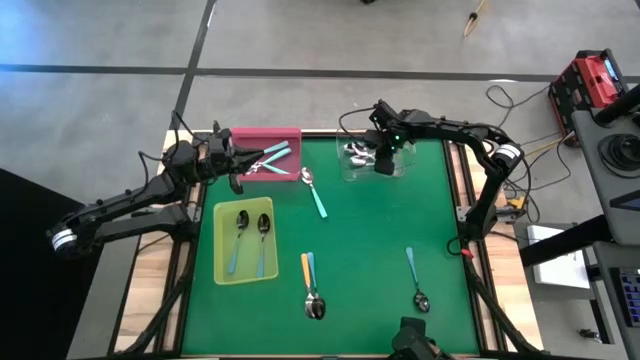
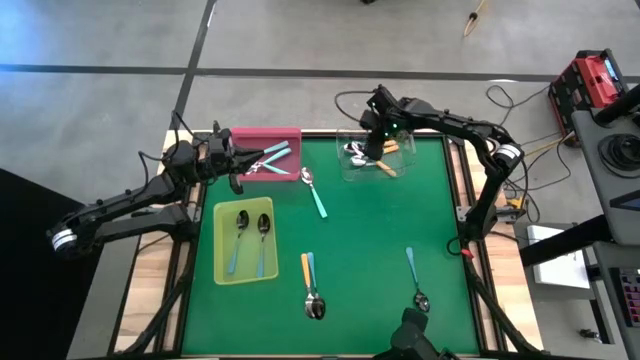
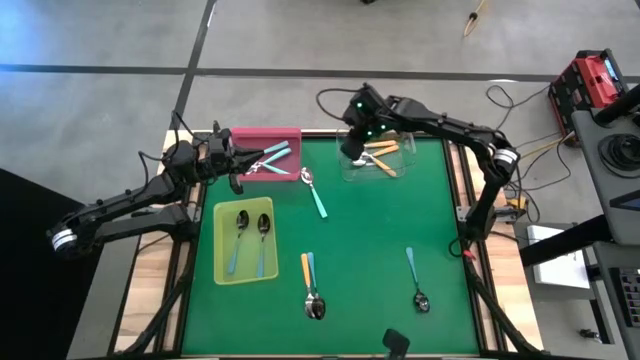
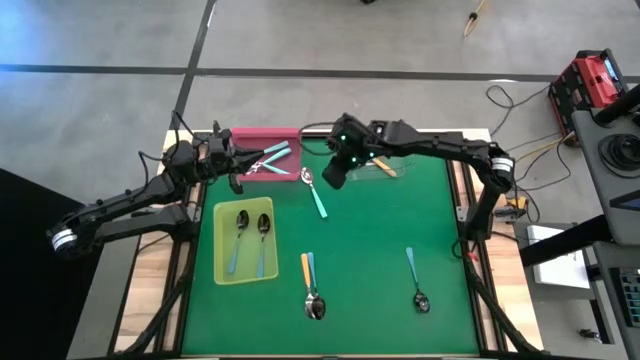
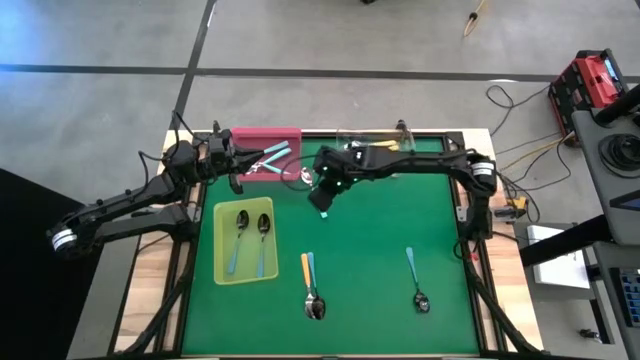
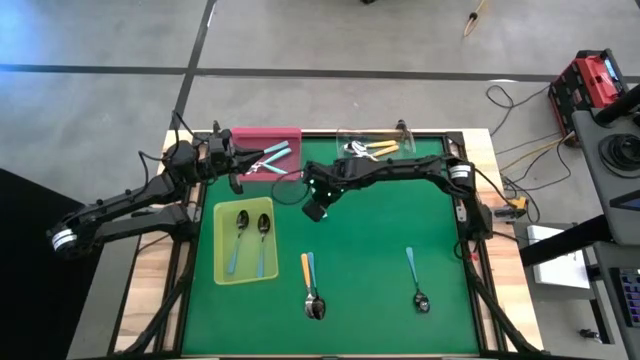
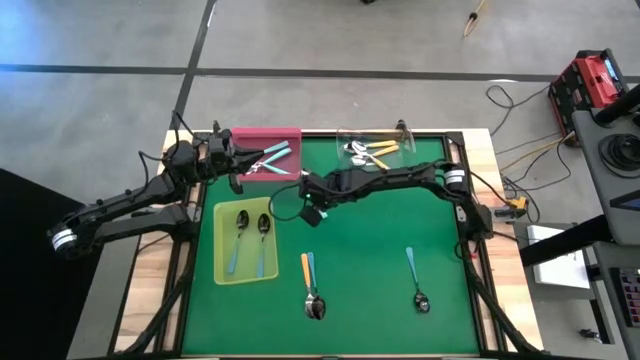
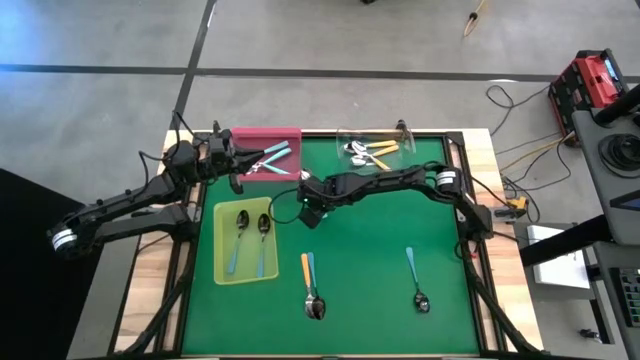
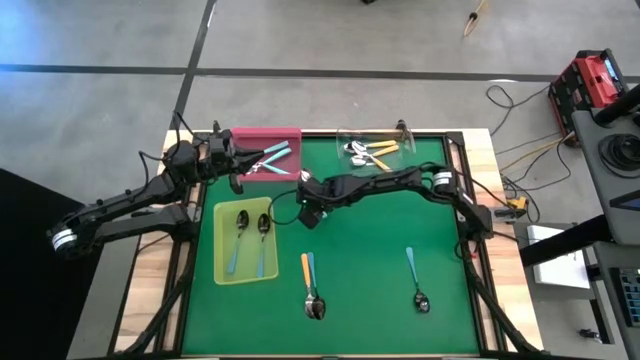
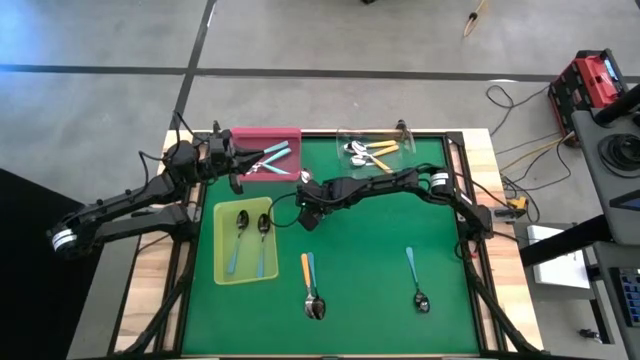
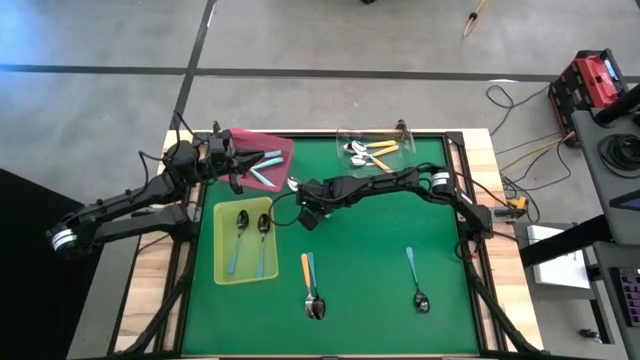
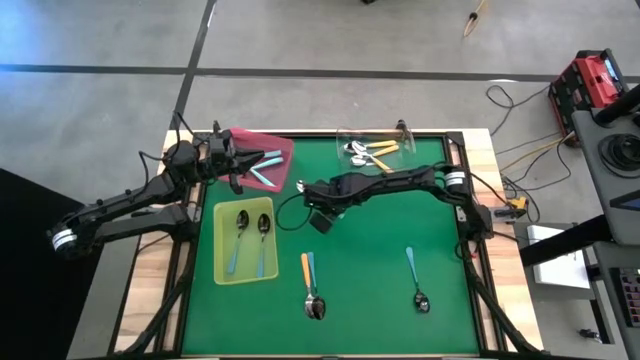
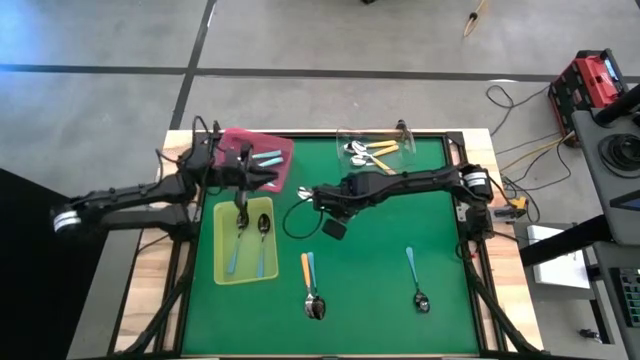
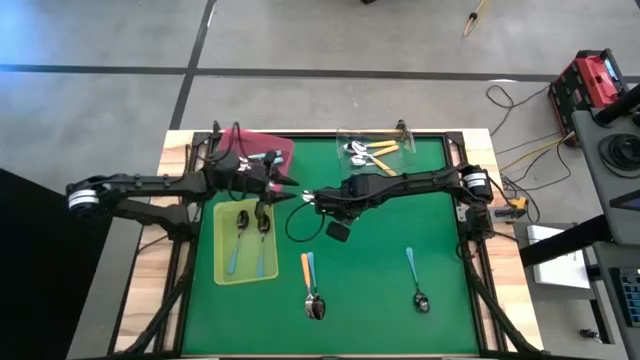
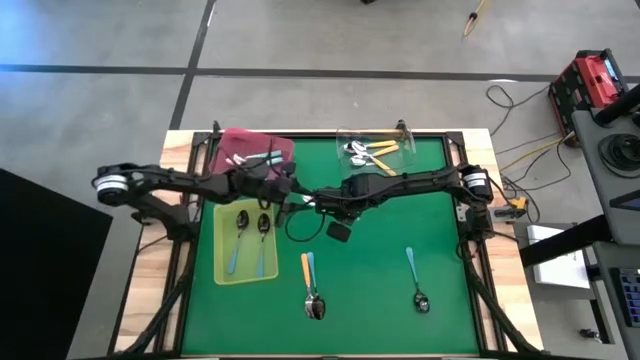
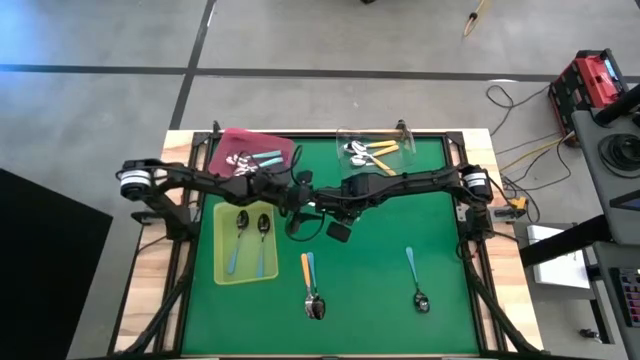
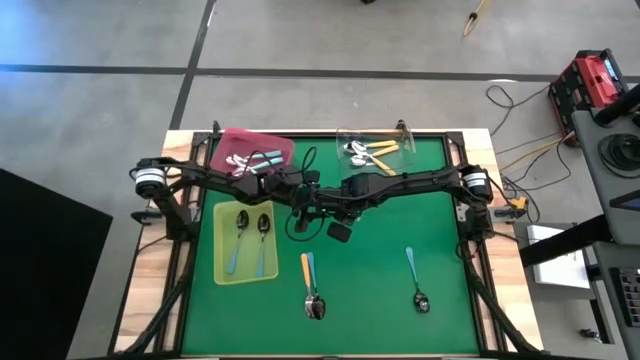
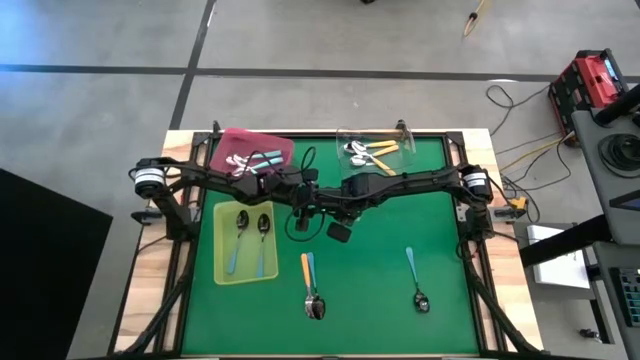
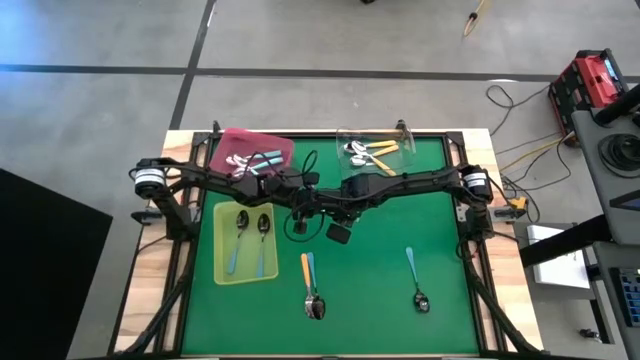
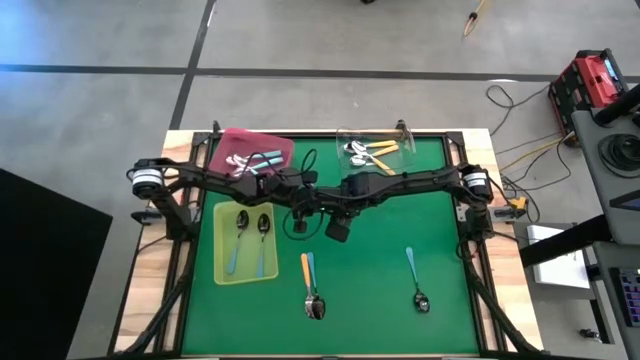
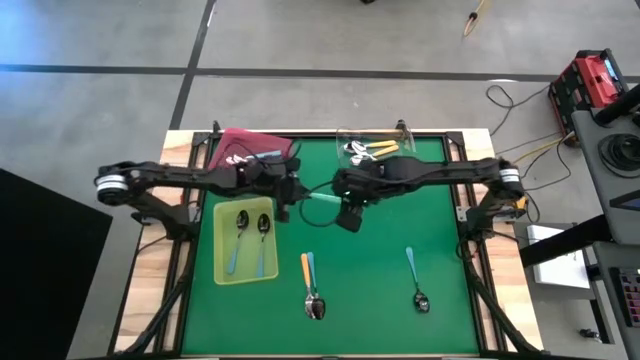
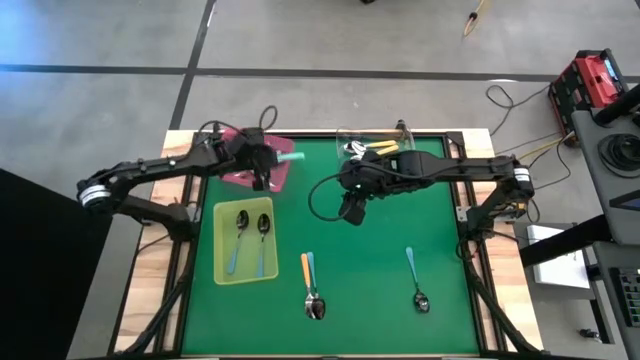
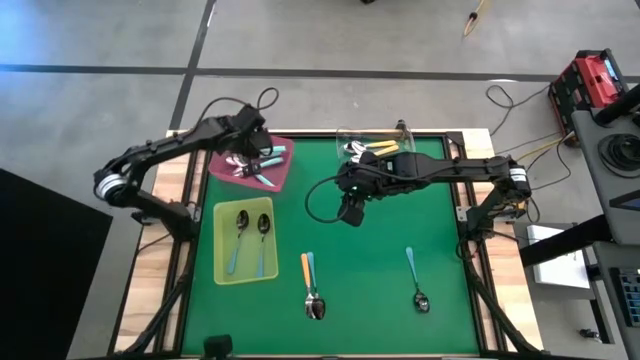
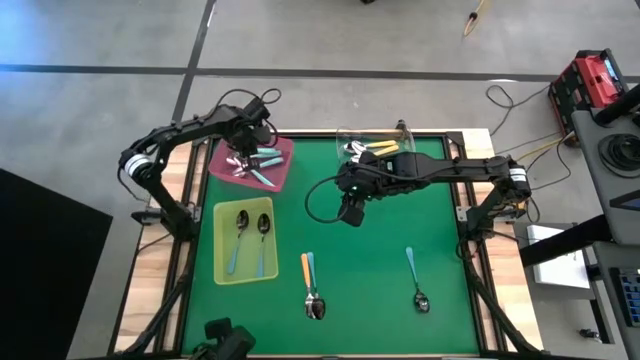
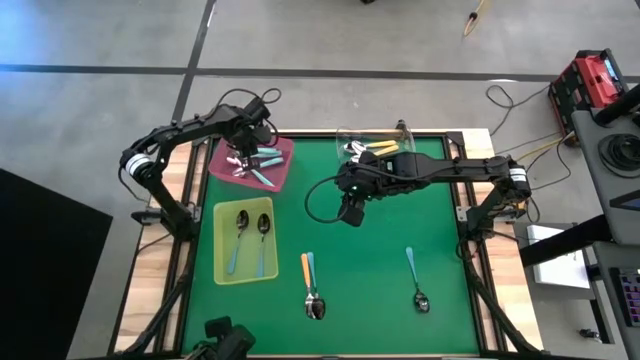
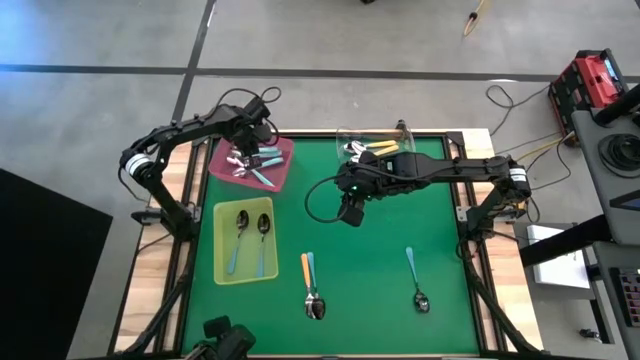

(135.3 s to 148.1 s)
Task: Sort silverware by color (type)
Put the light blue spoon into the red bin

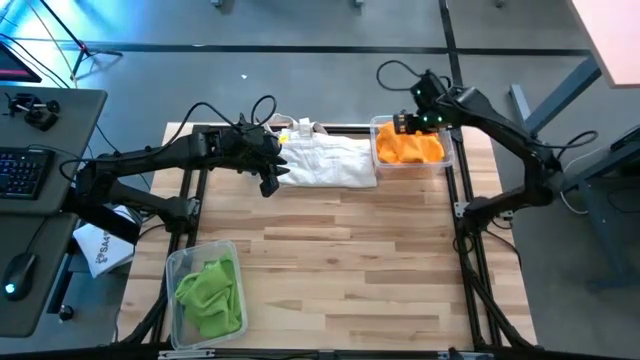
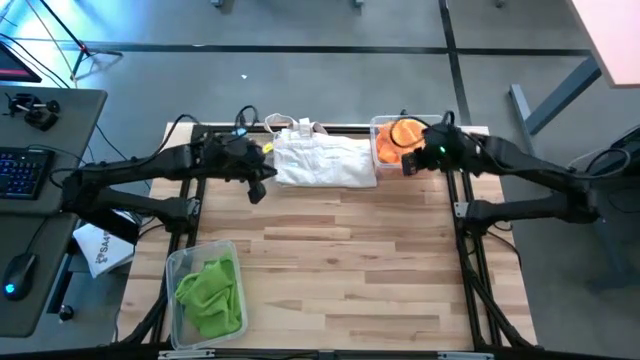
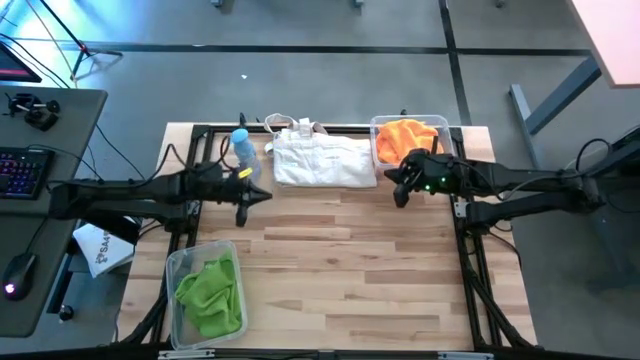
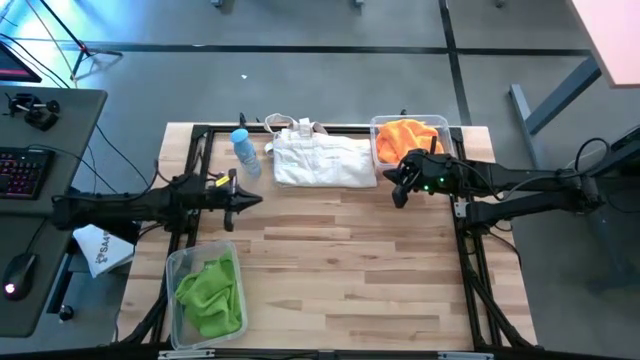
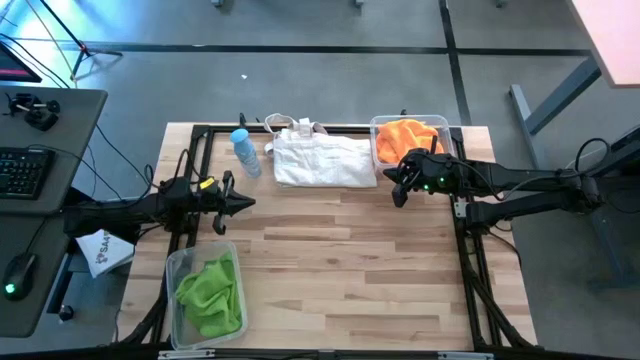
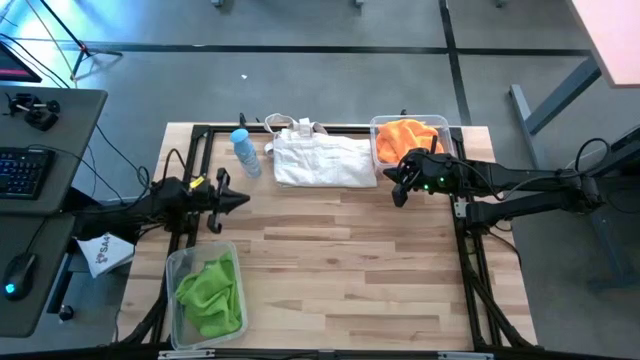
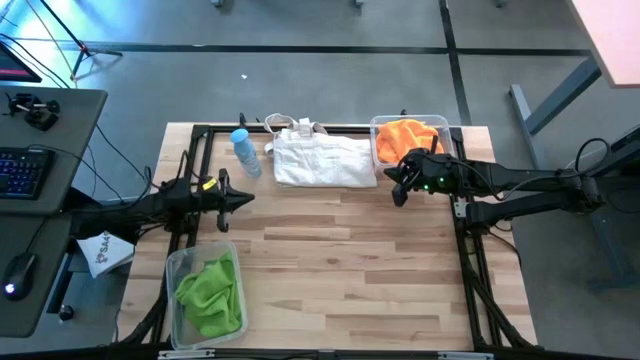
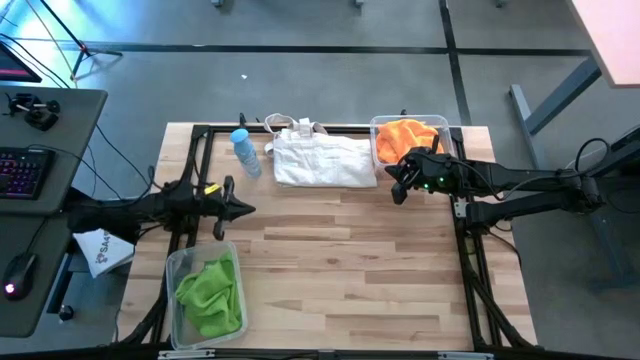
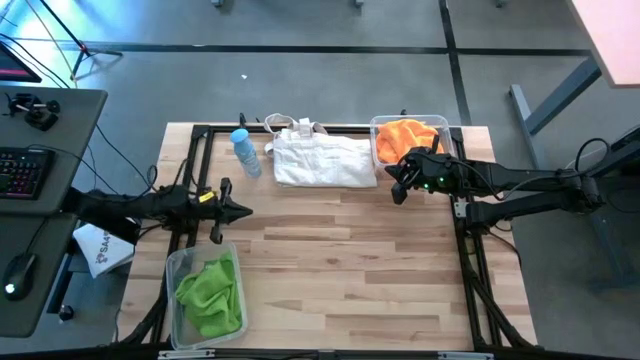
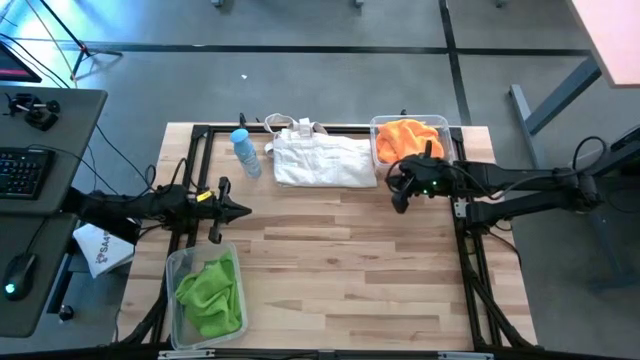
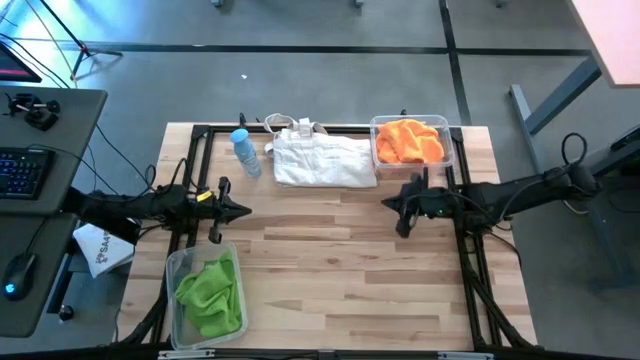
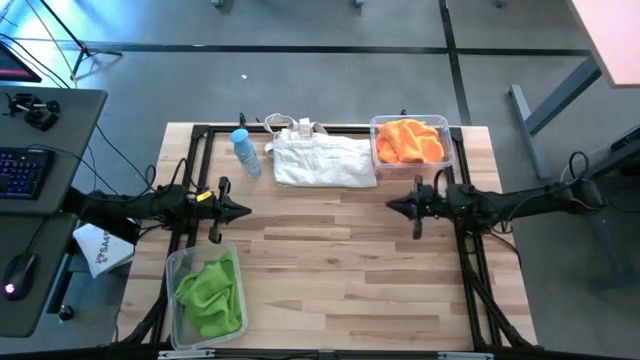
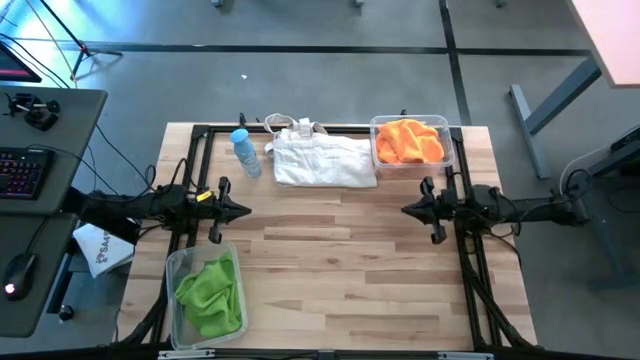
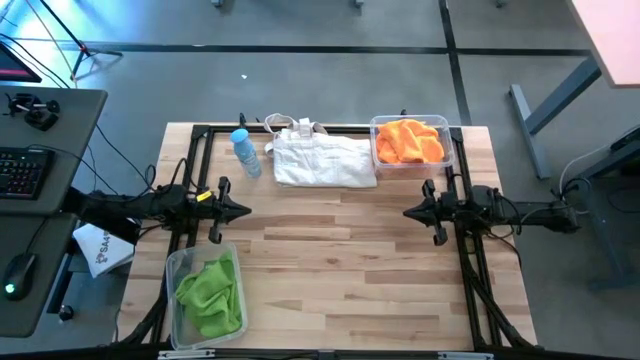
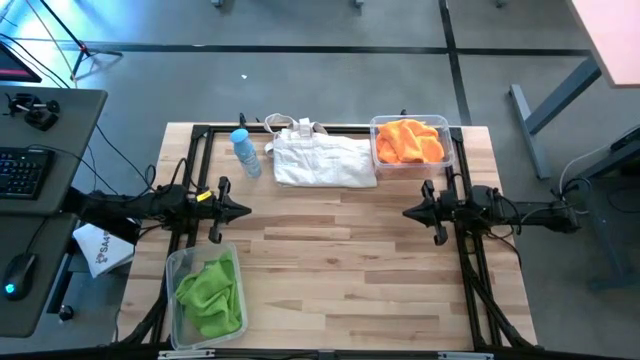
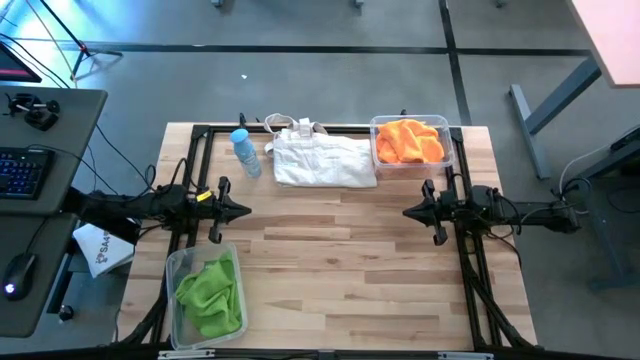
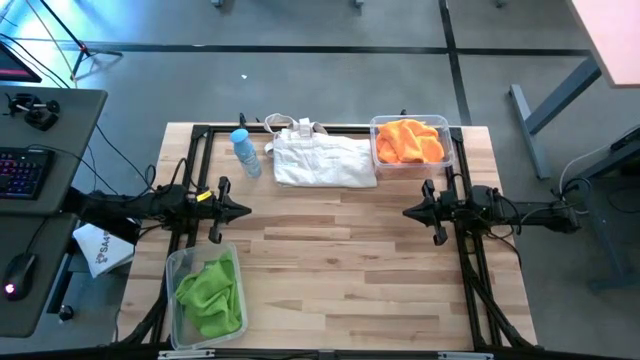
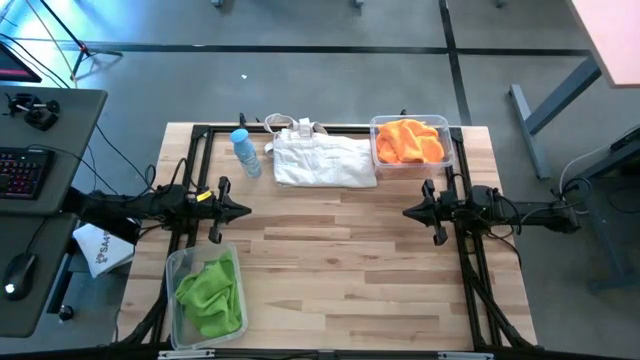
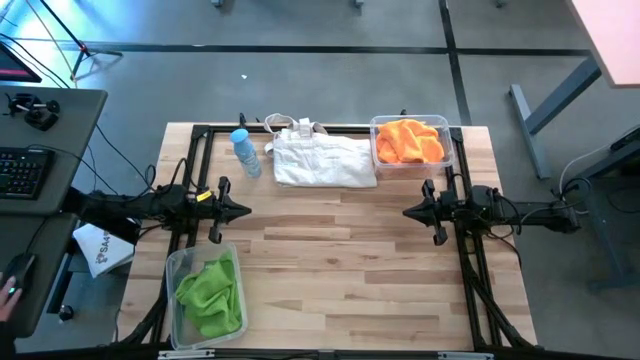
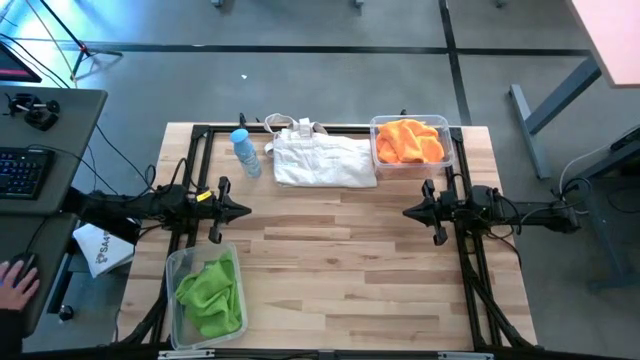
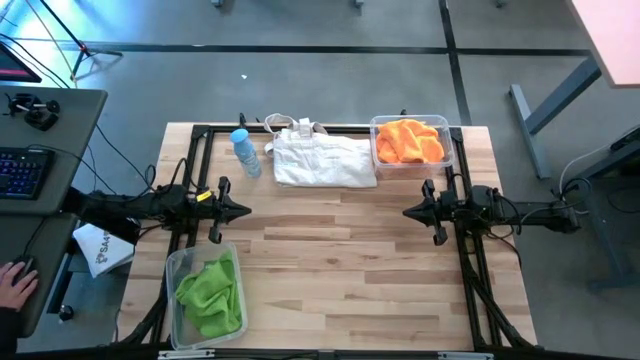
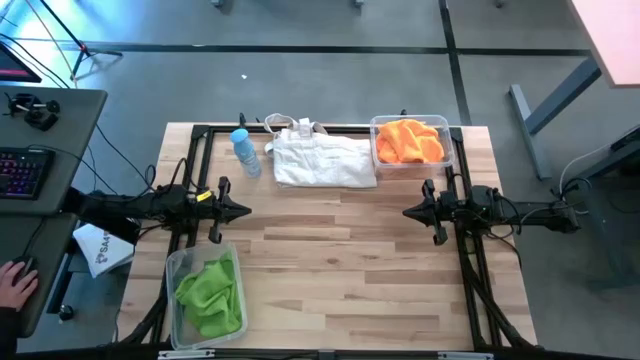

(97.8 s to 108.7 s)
Task: Sort microfiber towel by color & place in baskets
Return to Home Position
